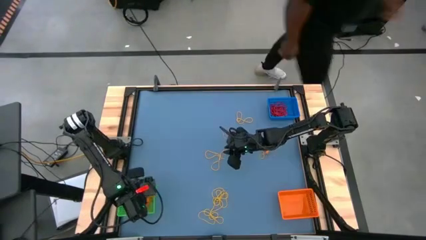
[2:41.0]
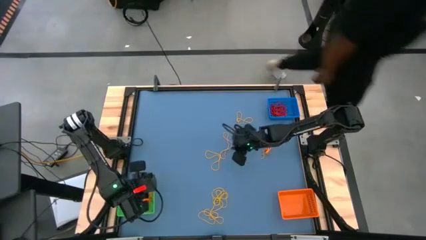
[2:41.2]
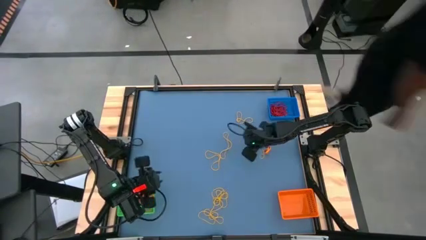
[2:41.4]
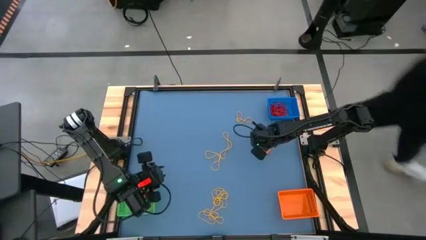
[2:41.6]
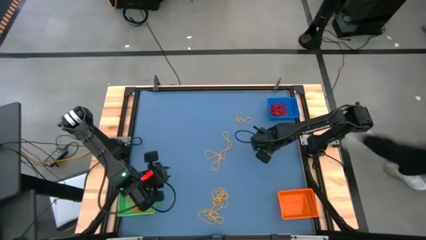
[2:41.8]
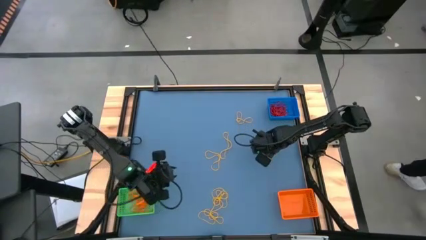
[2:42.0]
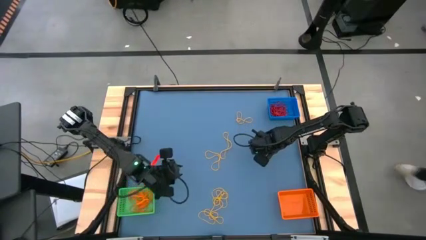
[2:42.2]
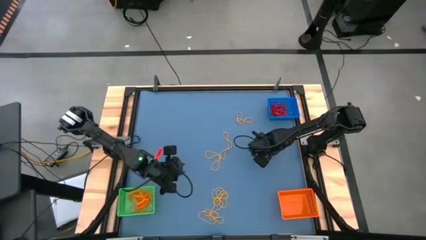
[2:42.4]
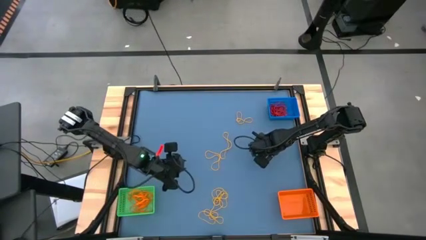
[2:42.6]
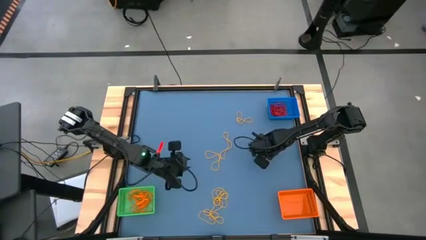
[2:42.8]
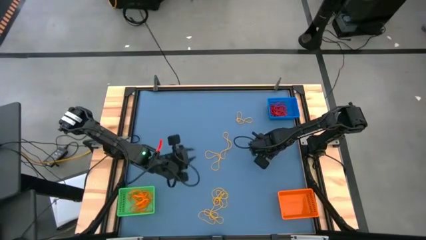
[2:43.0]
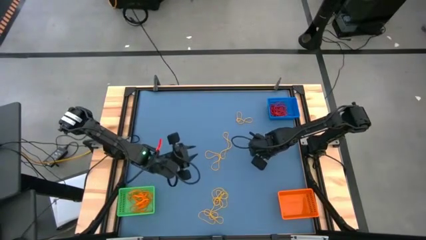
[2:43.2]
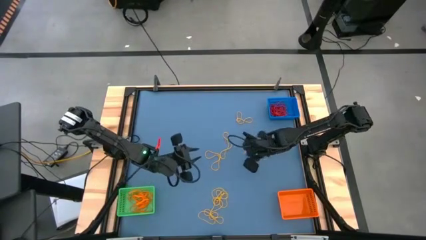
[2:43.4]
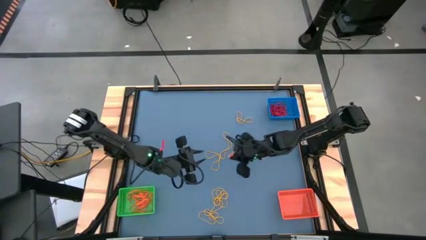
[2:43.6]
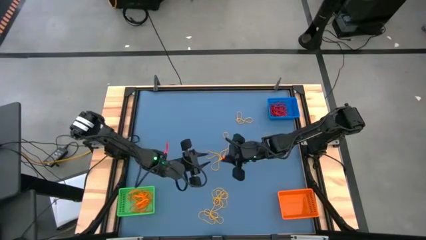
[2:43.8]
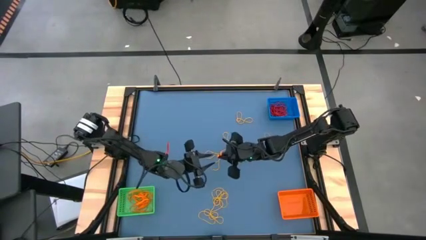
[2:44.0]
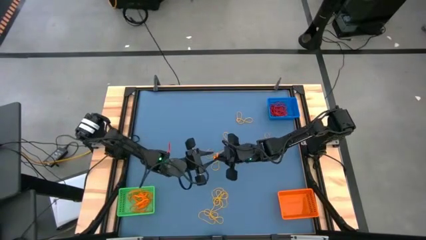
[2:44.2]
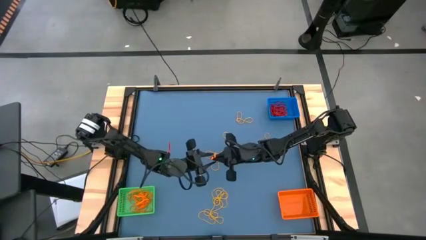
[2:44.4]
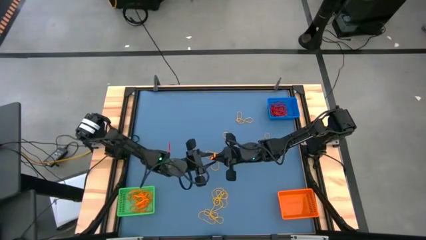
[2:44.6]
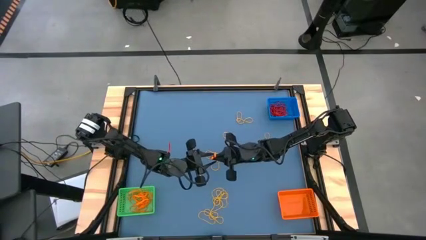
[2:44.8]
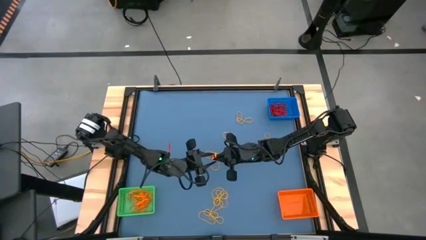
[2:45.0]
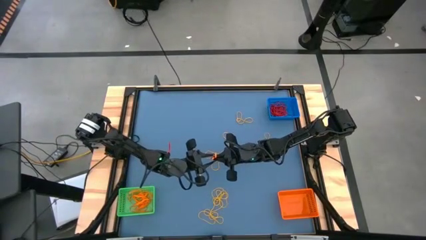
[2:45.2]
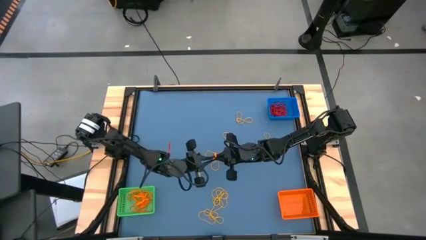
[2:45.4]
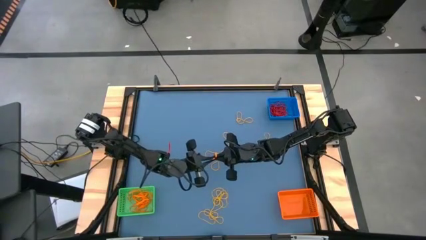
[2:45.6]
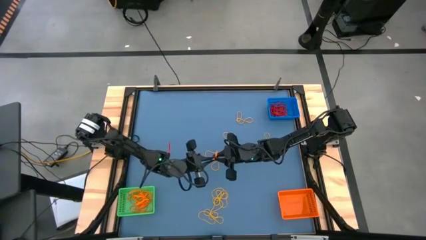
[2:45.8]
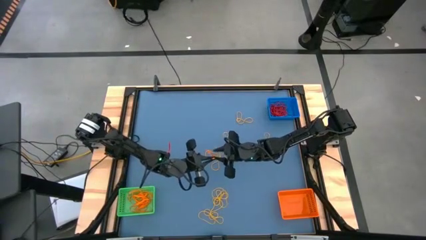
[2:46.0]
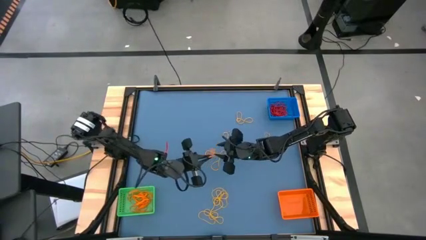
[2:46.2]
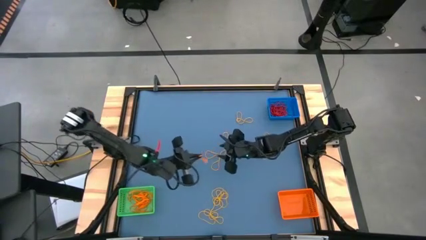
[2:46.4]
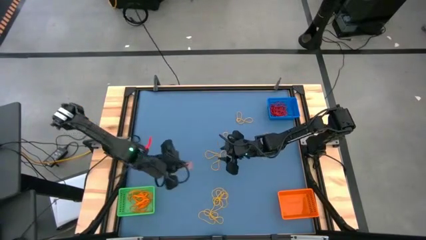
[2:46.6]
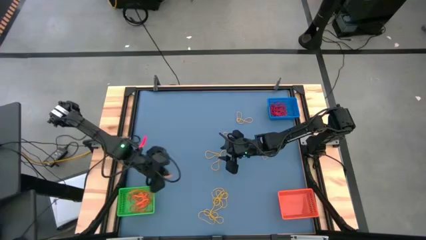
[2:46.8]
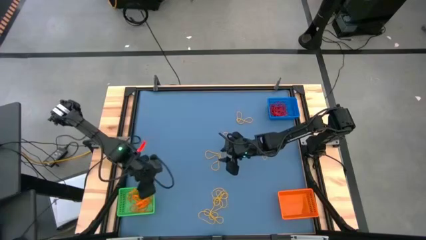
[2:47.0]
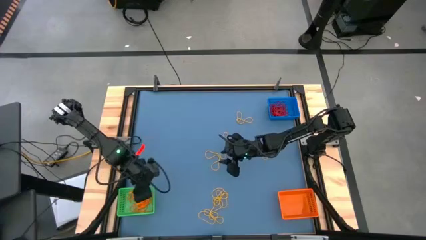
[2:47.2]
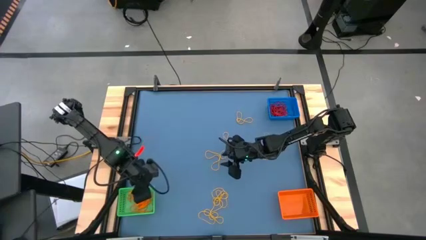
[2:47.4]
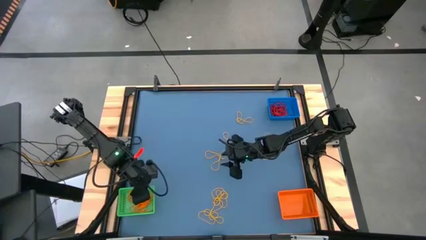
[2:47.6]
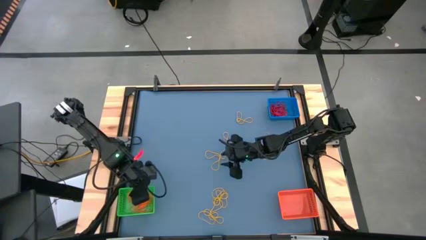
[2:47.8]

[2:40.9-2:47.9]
Task: Sort rubber bands into baskets
Put the orange rubber band into the green bin

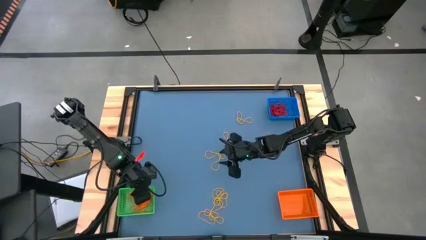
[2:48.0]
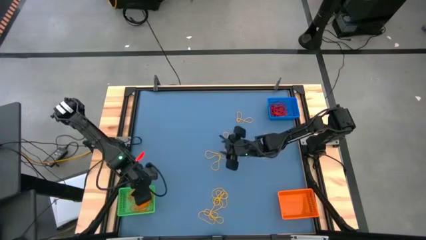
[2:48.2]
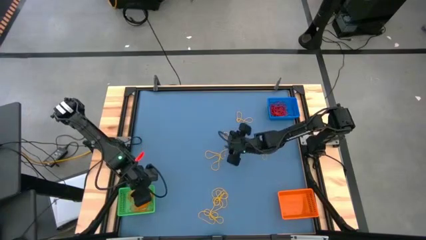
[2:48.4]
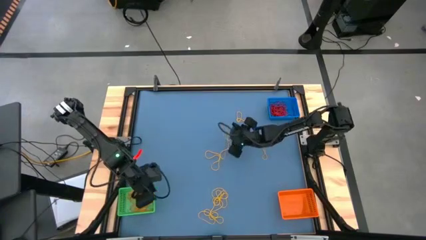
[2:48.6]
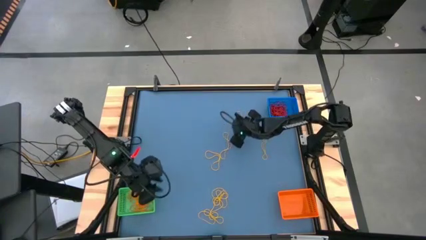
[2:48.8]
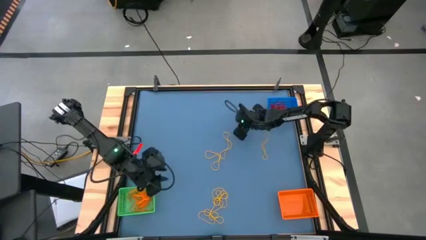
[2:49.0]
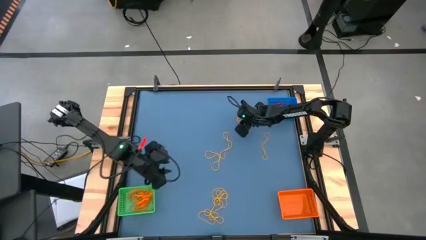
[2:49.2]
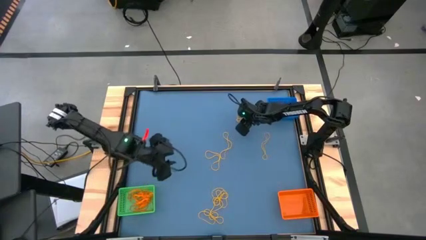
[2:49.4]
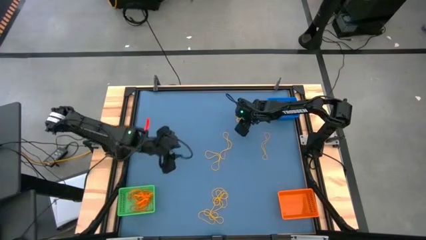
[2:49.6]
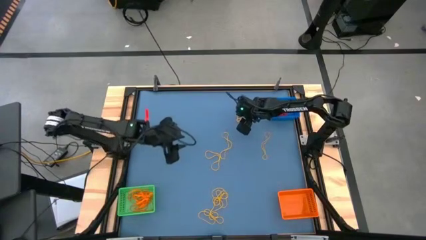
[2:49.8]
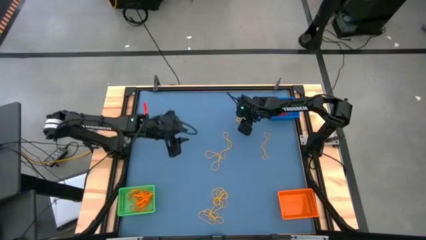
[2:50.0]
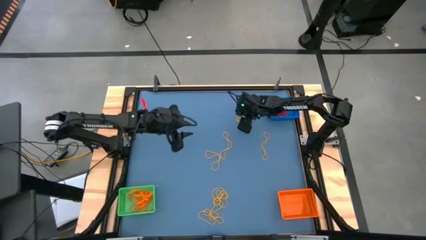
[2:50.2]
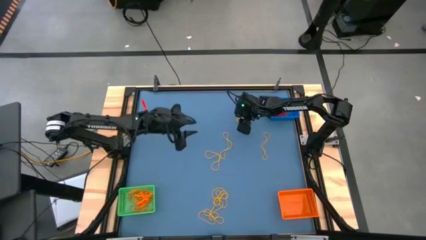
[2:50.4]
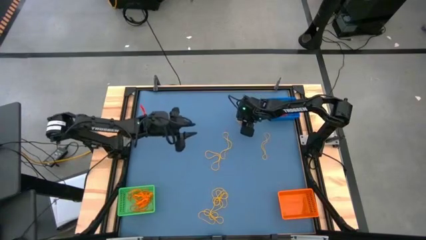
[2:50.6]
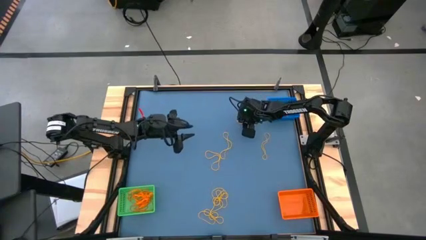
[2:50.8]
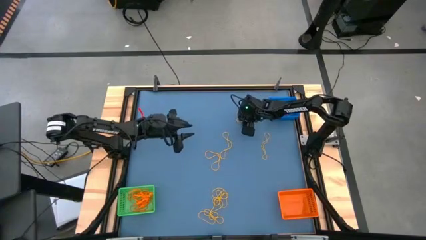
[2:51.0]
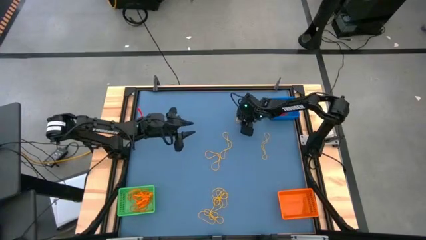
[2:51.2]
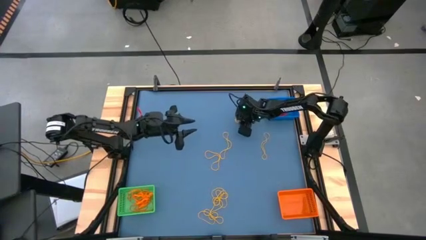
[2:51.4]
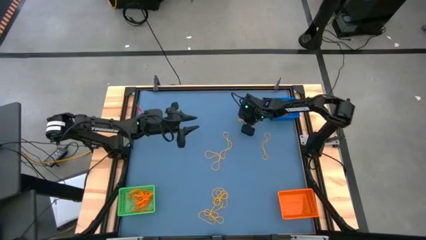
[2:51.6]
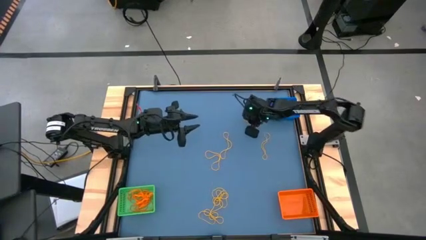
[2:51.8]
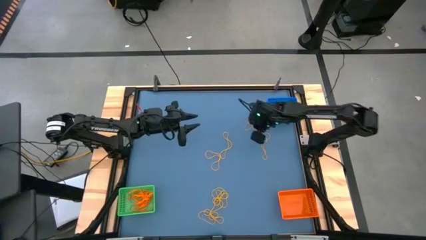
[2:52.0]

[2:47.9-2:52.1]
Put the yellow rubber band into the orange bin

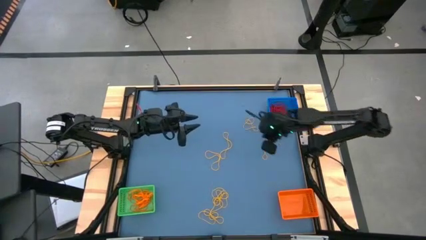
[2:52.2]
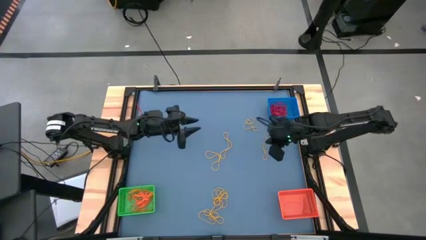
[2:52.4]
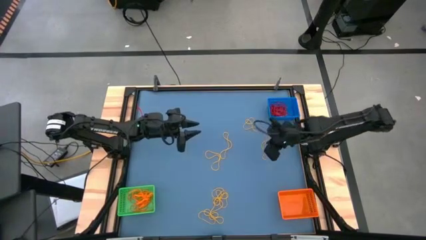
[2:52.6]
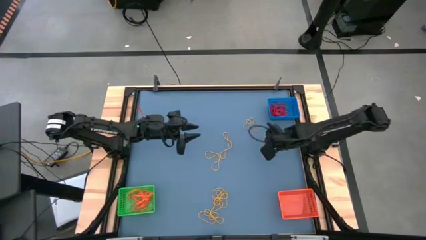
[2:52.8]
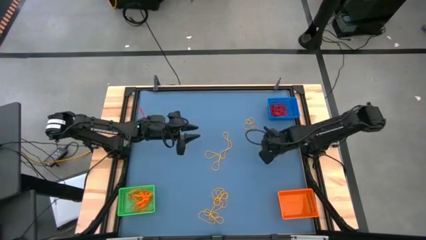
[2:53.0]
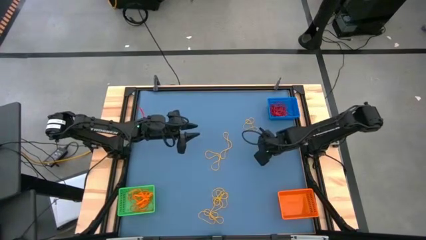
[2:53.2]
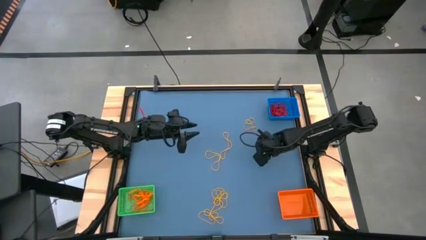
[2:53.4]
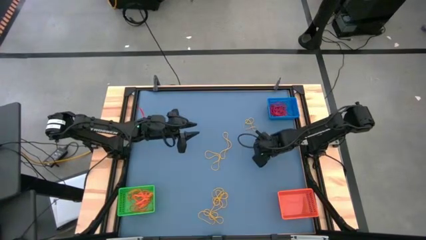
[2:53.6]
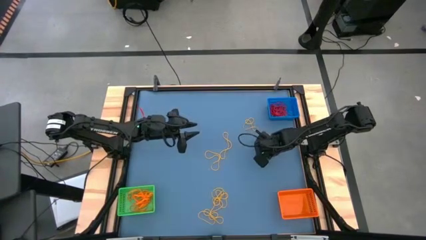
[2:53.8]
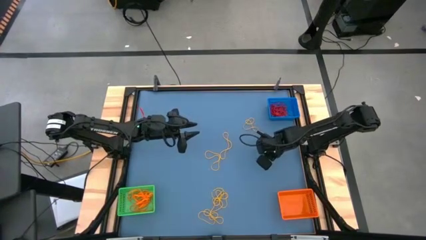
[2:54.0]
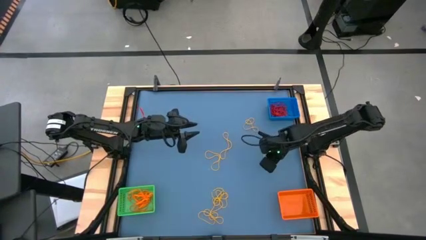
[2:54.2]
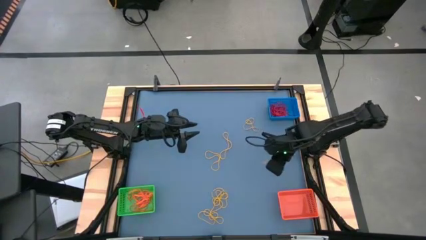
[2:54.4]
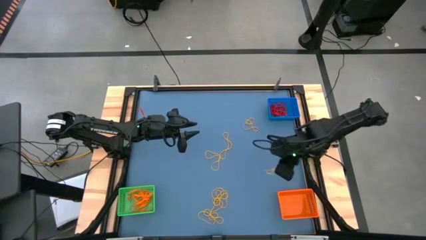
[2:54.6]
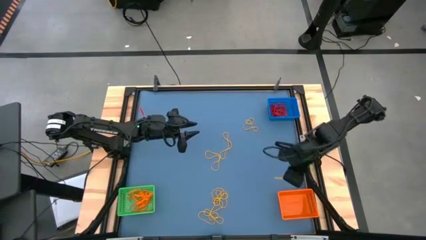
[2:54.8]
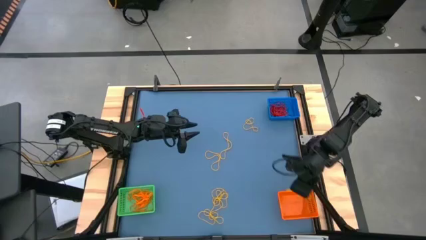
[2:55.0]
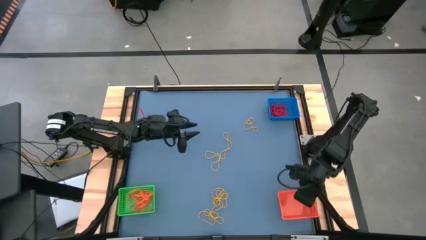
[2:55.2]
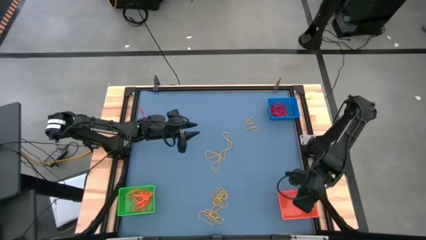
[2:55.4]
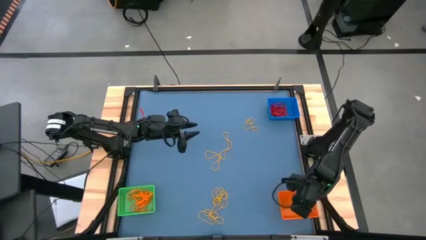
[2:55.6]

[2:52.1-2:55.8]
Put the yellow rubber band into the orange bin
